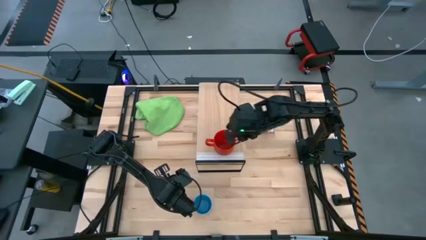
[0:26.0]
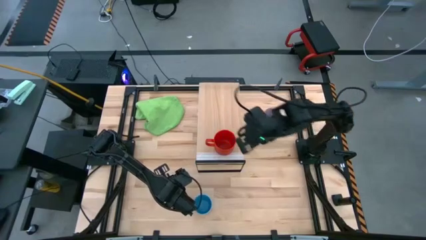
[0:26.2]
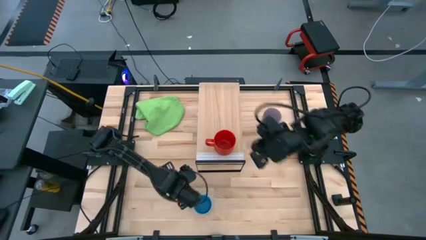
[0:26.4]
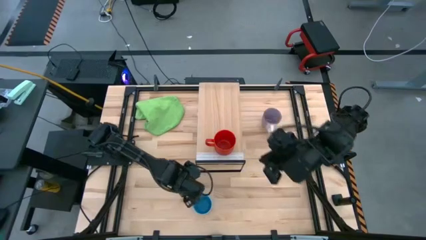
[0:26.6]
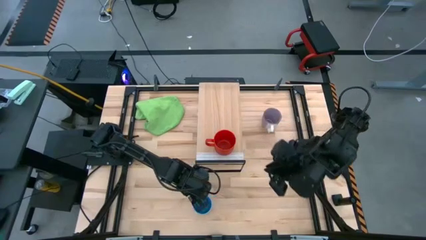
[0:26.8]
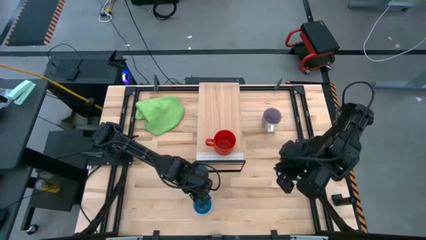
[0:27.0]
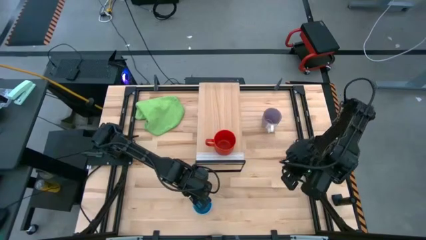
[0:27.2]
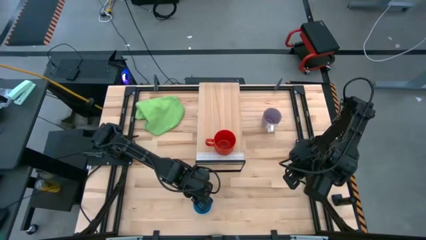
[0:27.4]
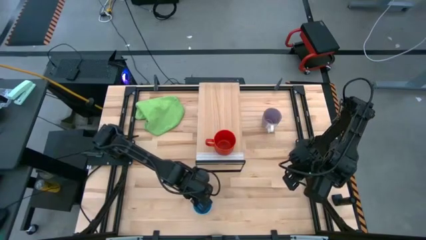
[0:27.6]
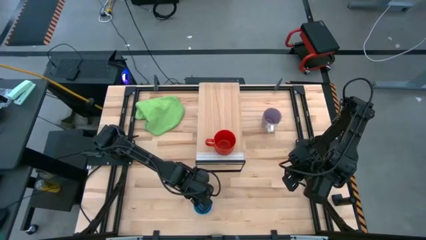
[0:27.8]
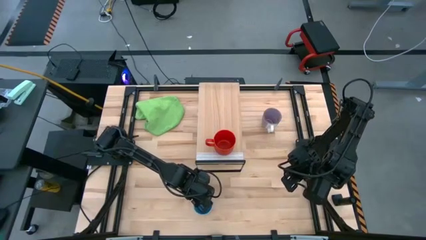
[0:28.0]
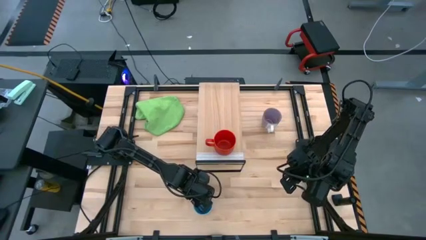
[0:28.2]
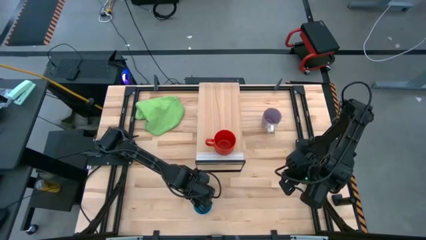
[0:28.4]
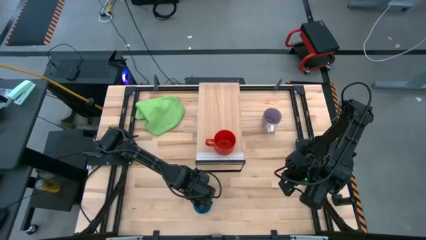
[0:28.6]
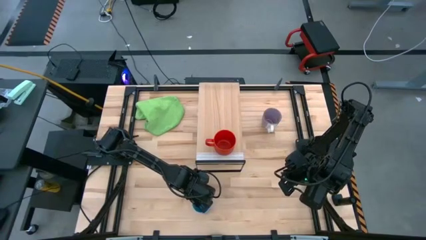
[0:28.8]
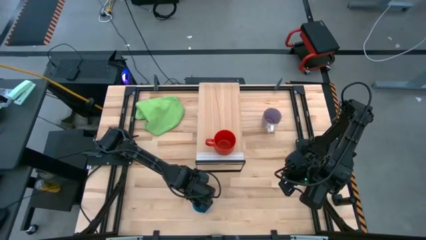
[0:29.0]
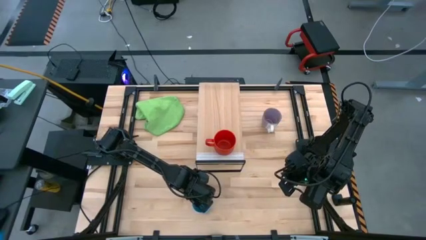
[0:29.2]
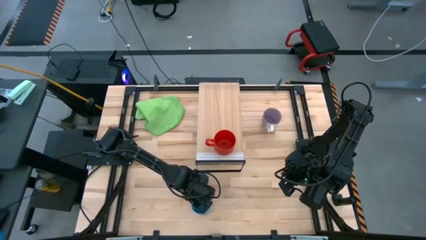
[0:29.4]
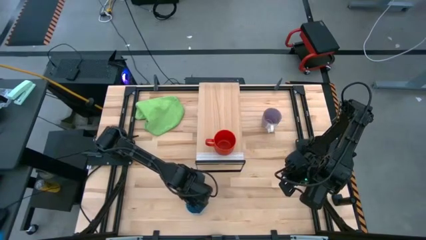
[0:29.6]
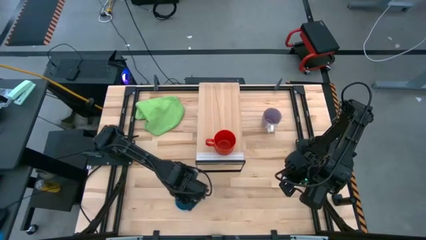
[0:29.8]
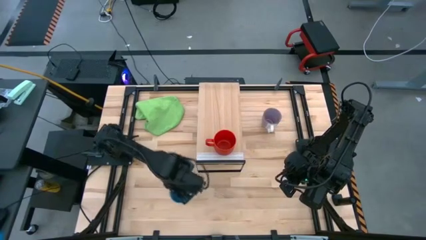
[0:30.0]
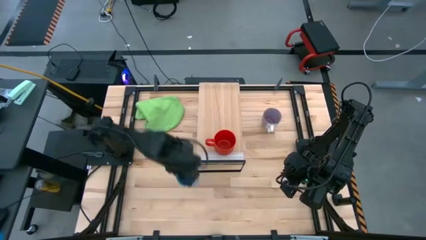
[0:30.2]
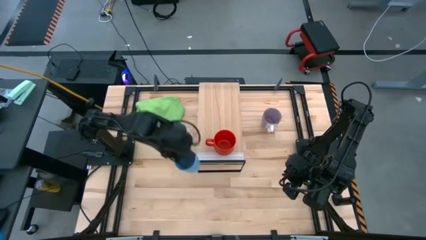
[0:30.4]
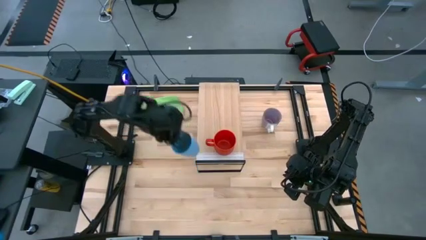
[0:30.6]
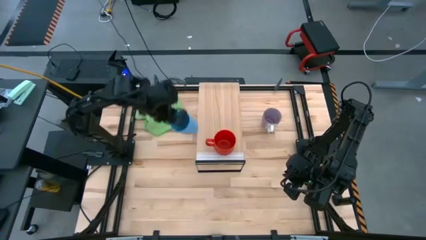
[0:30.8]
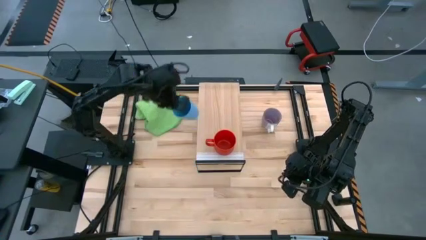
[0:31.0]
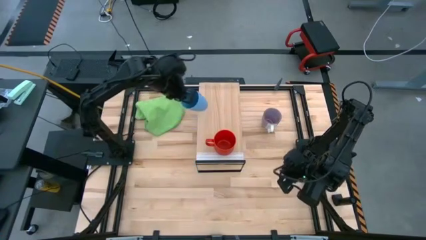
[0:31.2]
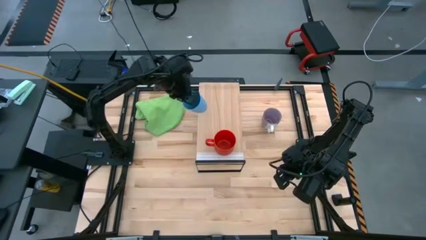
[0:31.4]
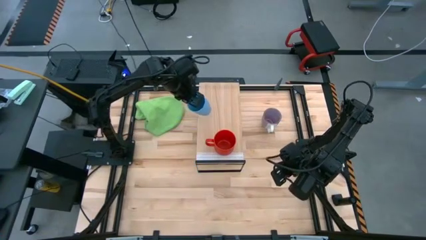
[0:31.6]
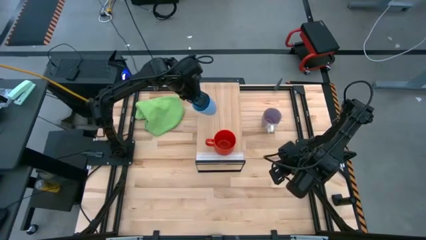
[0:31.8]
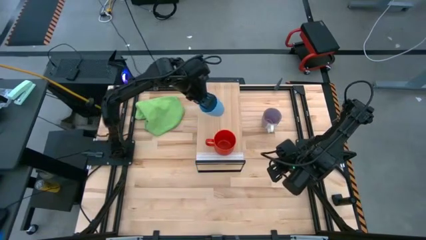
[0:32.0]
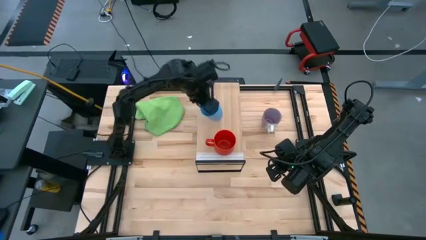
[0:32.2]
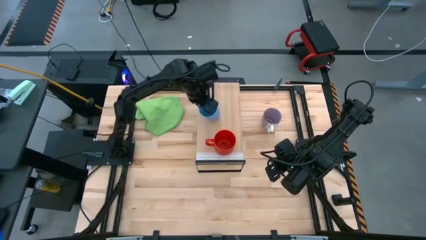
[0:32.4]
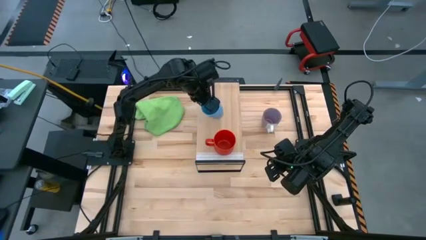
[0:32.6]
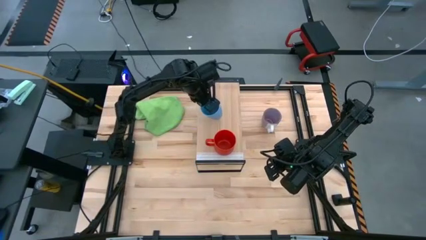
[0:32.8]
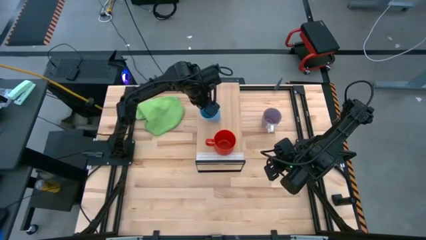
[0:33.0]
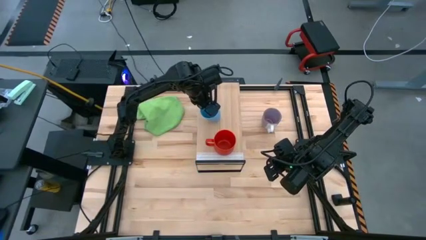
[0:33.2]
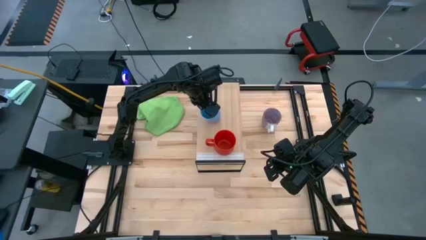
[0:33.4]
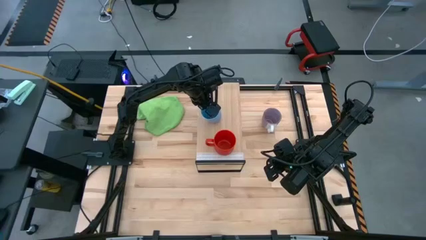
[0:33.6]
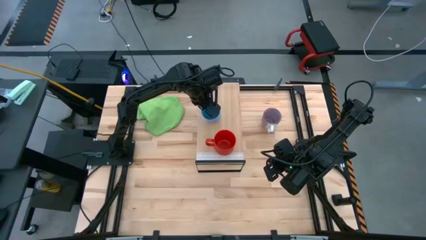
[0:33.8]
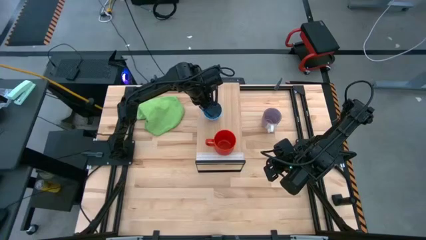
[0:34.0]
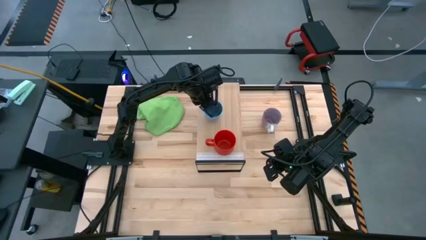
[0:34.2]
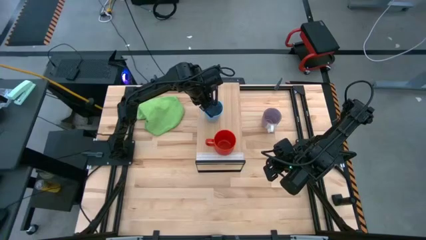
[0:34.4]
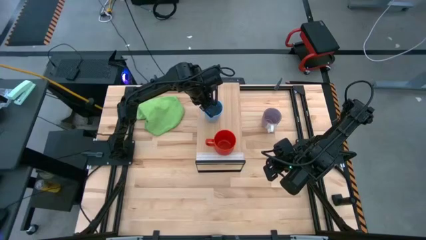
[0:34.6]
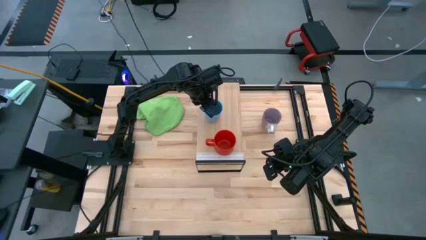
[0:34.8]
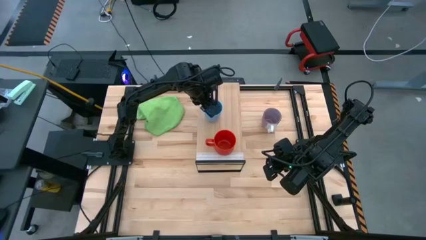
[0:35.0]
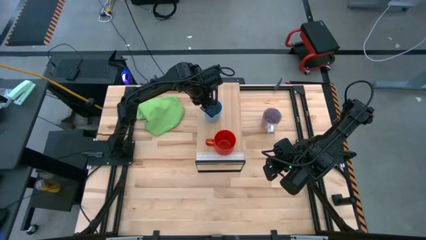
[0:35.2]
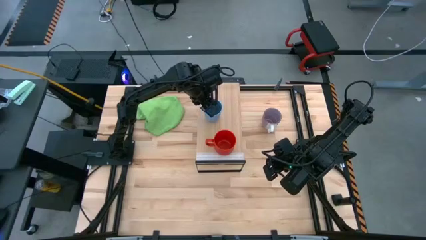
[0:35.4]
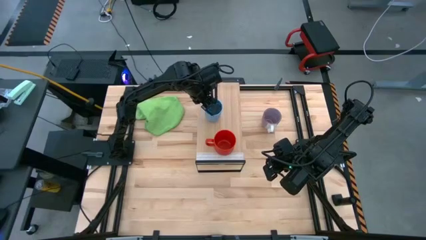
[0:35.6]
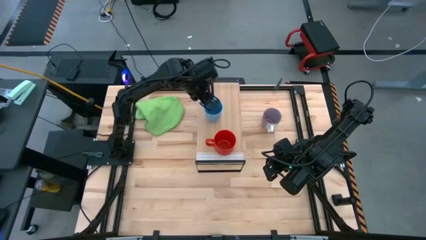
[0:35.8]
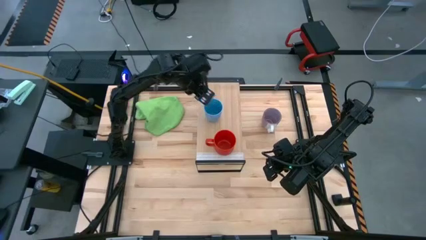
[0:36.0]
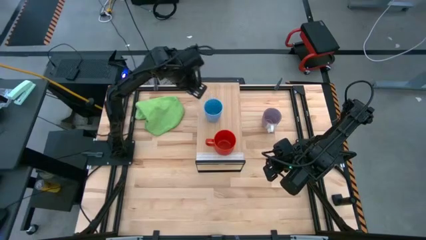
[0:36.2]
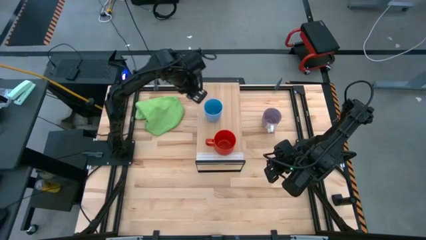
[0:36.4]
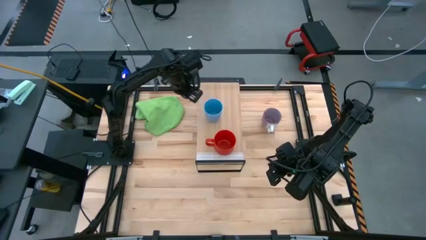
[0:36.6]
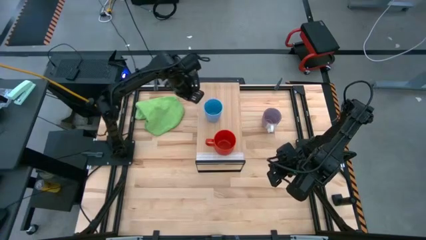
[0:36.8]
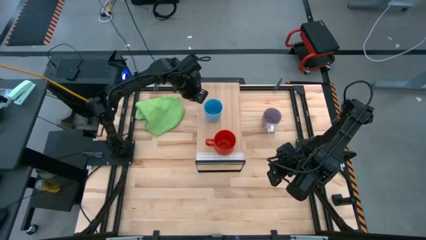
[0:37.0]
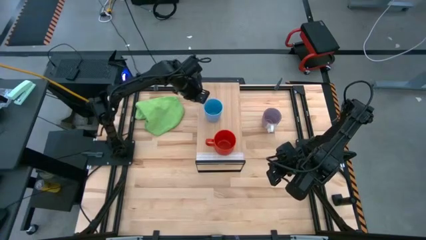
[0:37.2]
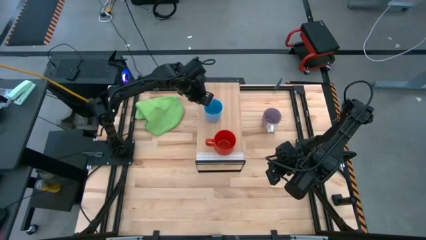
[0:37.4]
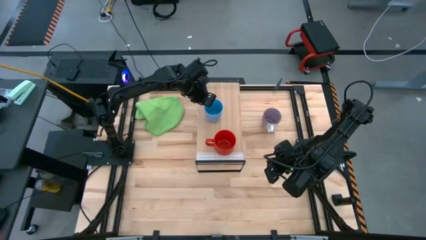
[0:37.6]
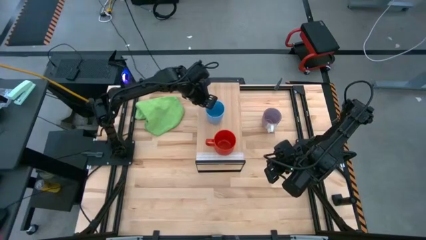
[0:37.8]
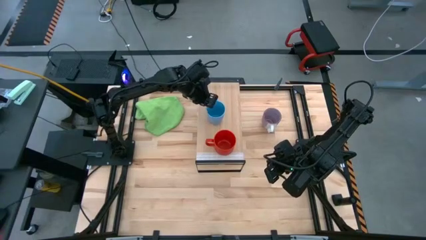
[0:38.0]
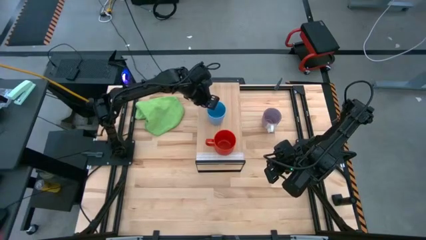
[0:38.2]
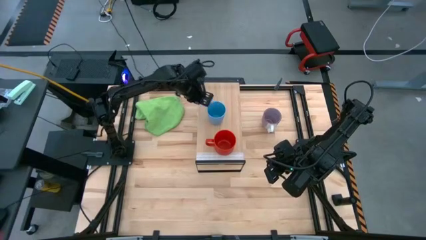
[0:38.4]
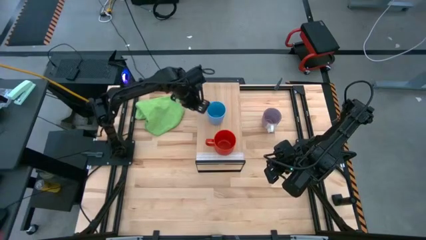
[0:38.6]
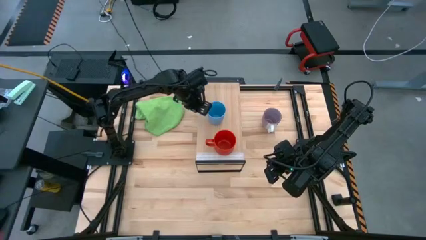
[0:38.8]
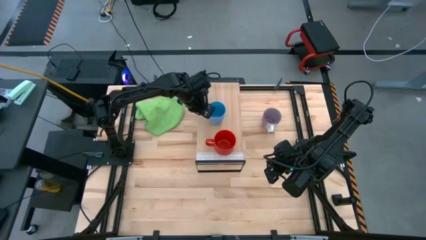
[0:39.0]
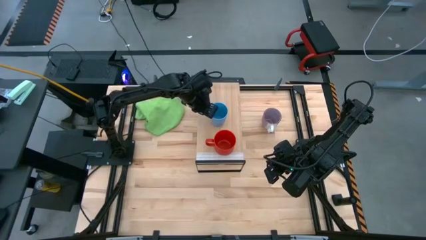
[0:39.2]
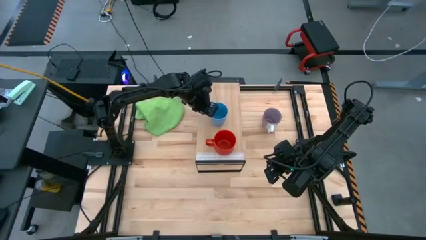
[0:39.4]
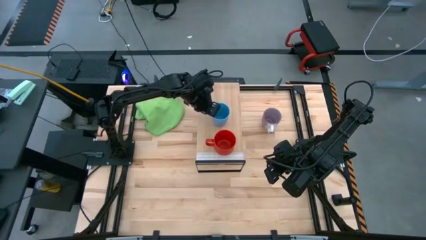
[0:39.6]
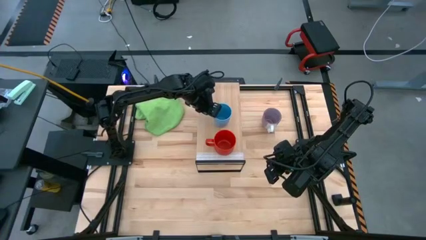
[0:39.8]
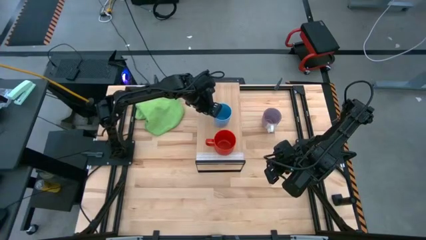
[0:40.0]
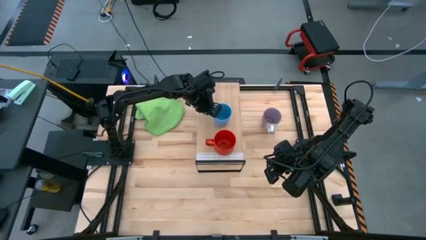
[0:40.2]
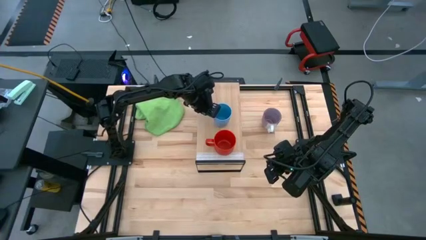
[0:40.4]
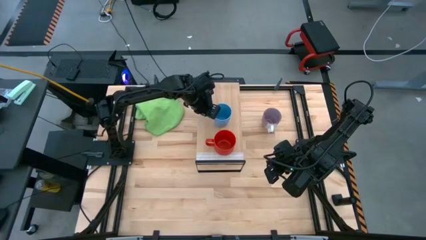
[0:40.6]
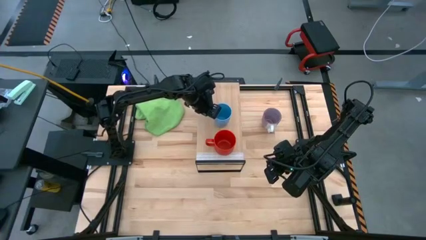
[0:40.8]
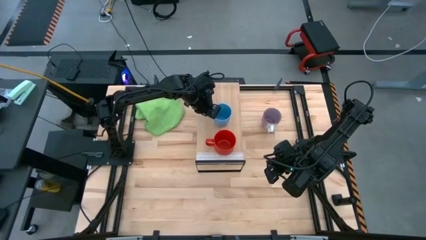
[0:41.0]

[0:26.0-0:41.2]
Task: Stack small to large cups/mugs on shelf
Put the blue cup on the shelf
